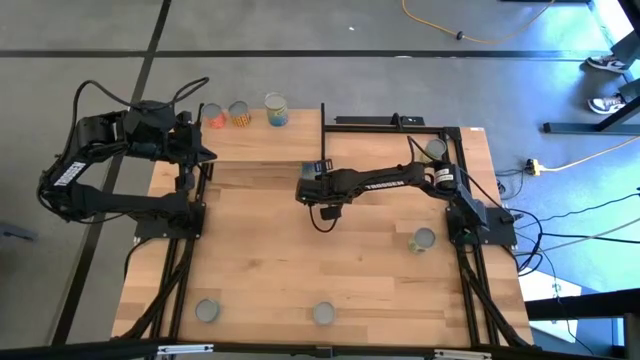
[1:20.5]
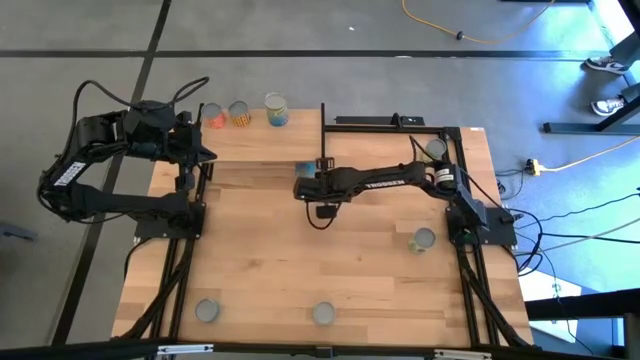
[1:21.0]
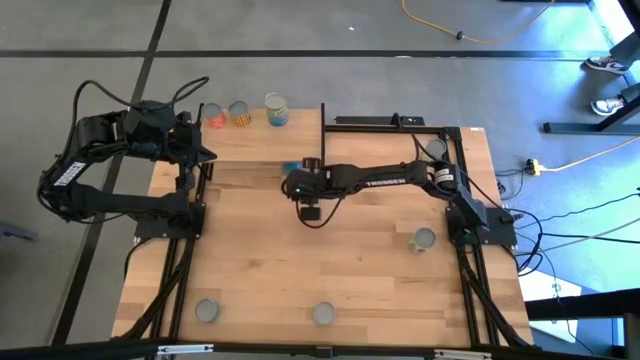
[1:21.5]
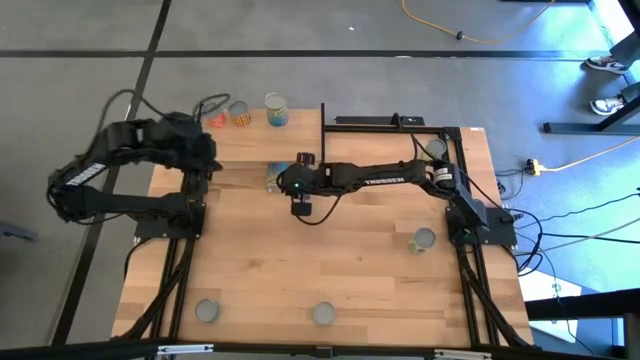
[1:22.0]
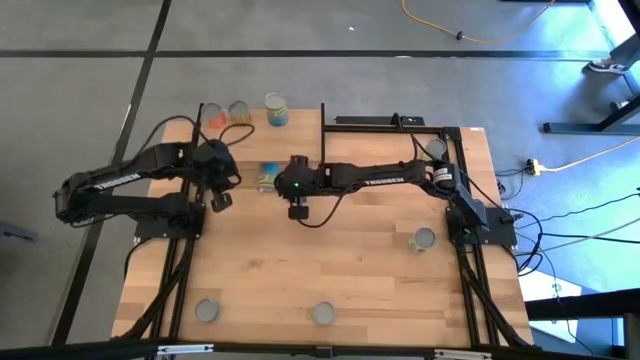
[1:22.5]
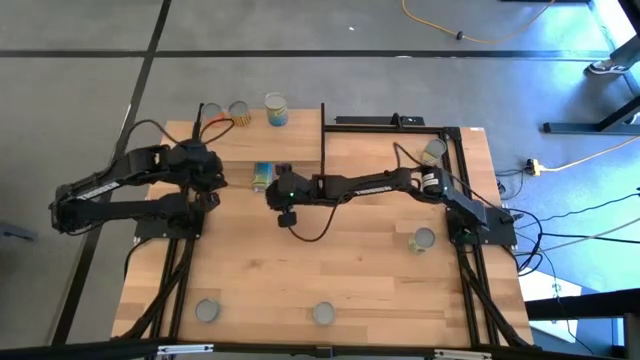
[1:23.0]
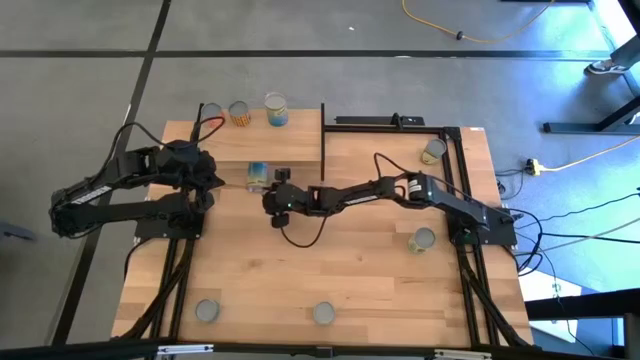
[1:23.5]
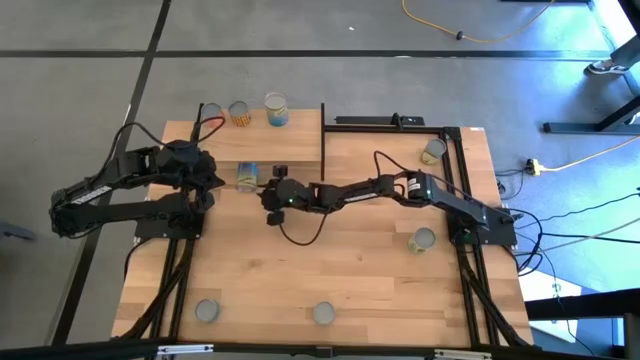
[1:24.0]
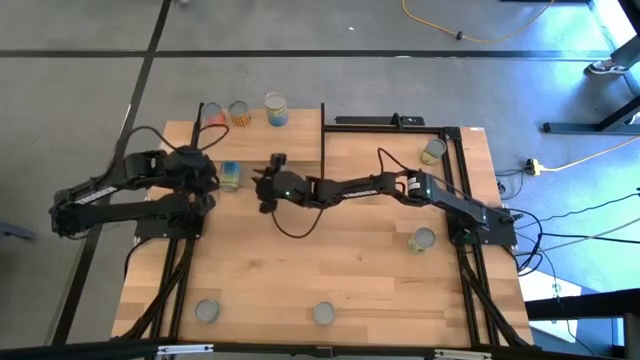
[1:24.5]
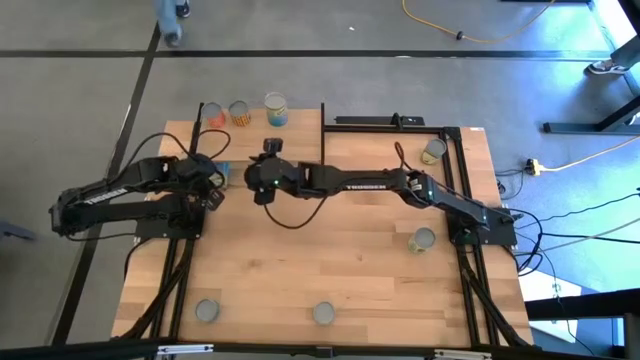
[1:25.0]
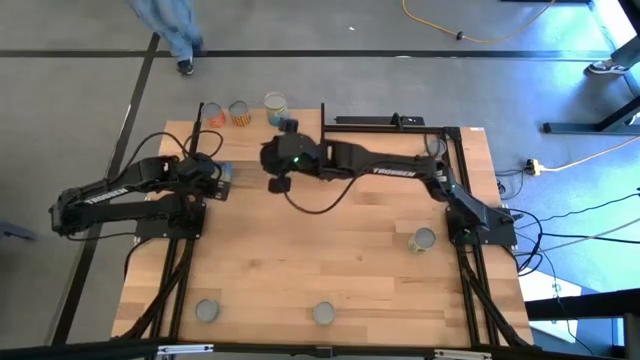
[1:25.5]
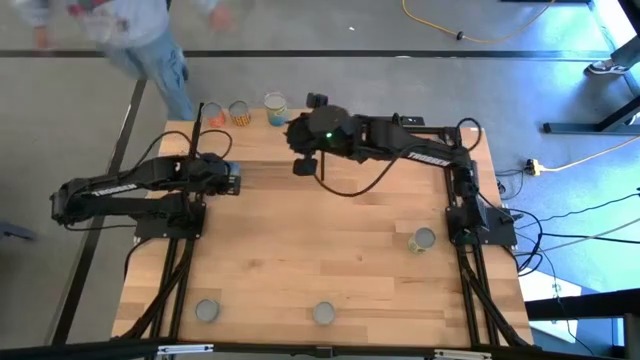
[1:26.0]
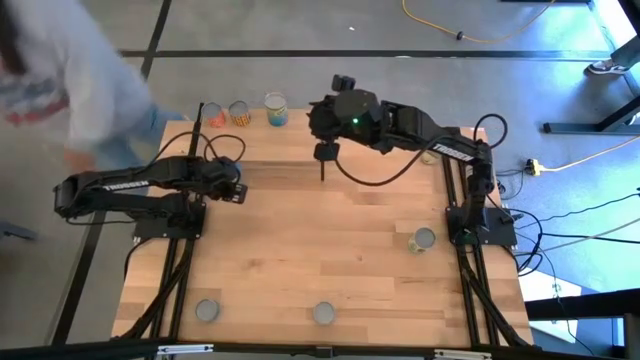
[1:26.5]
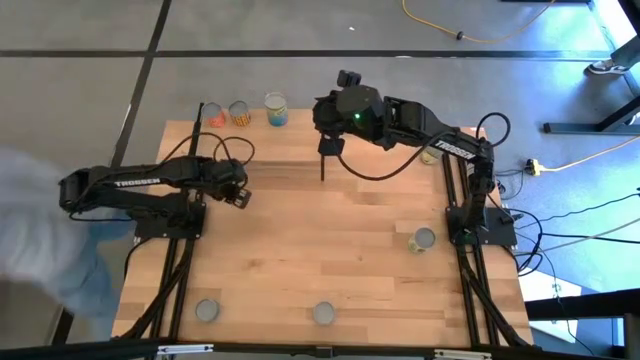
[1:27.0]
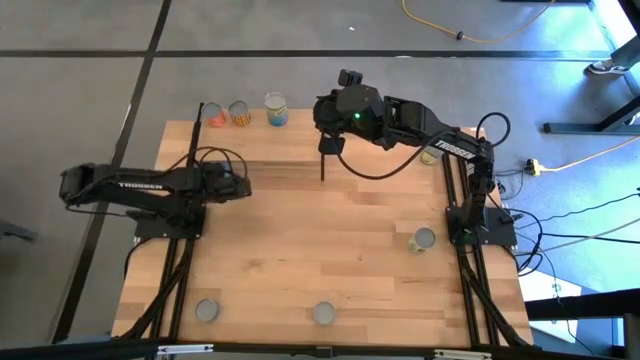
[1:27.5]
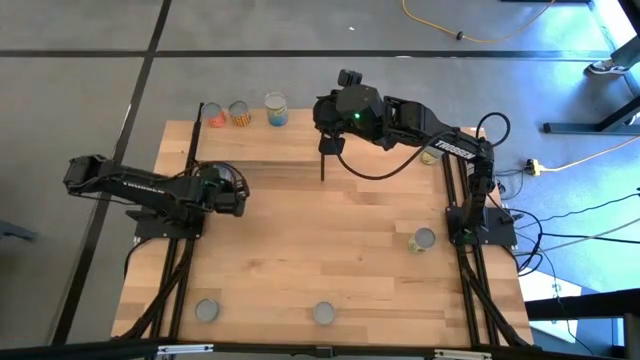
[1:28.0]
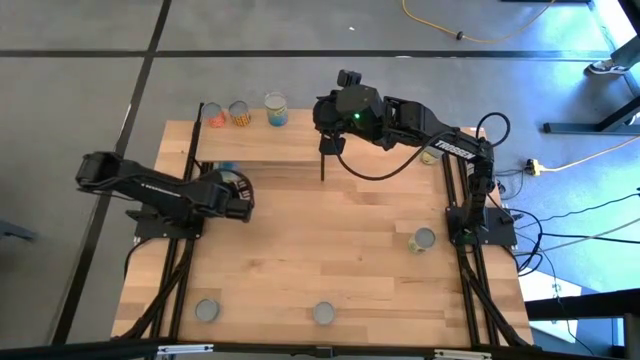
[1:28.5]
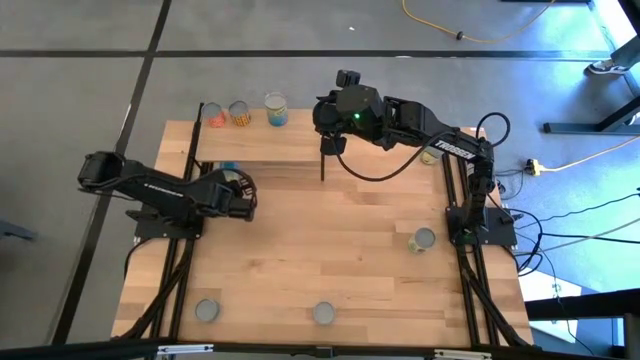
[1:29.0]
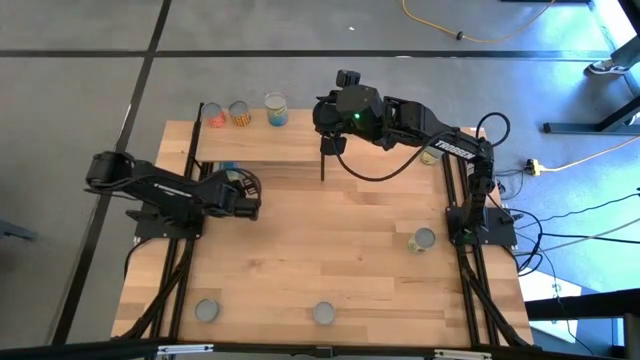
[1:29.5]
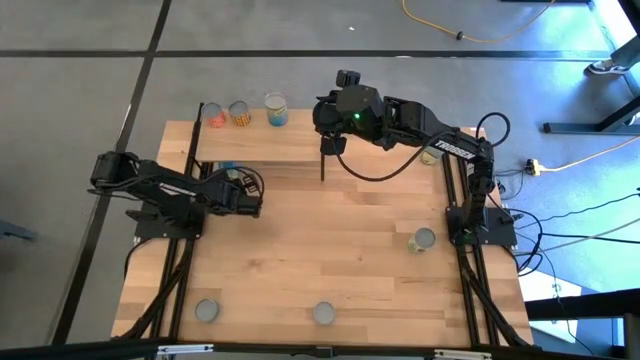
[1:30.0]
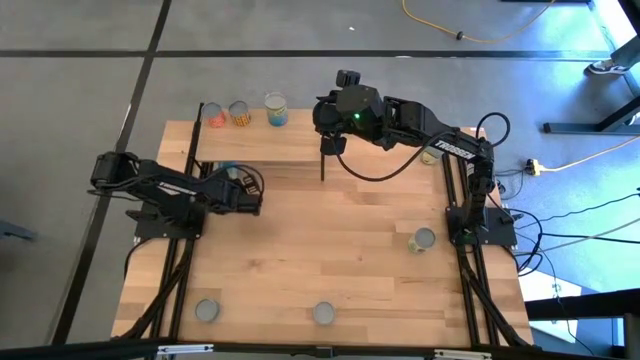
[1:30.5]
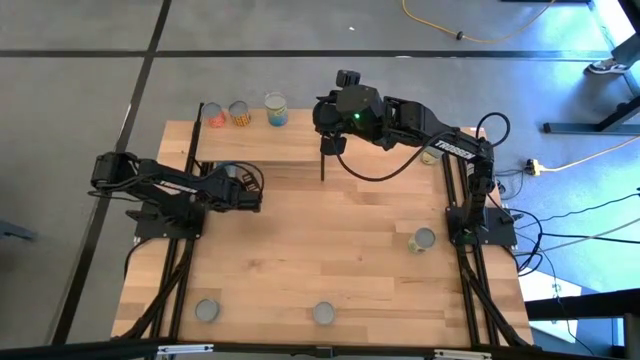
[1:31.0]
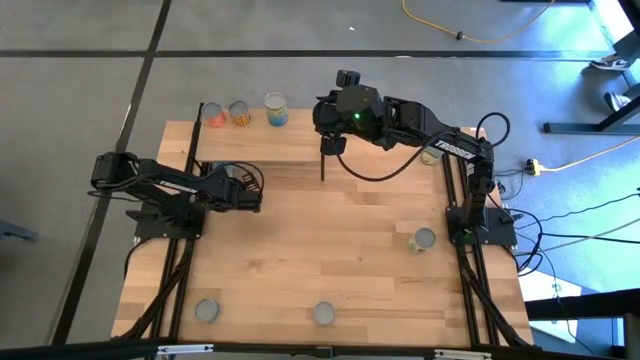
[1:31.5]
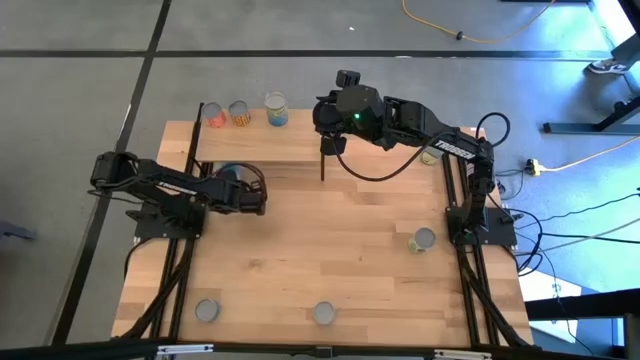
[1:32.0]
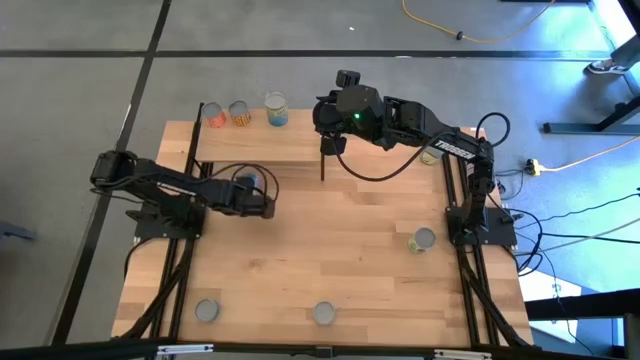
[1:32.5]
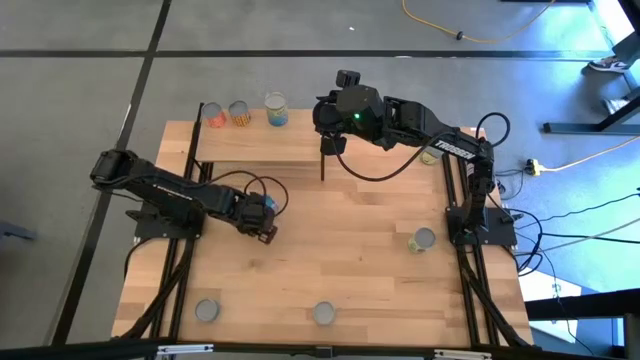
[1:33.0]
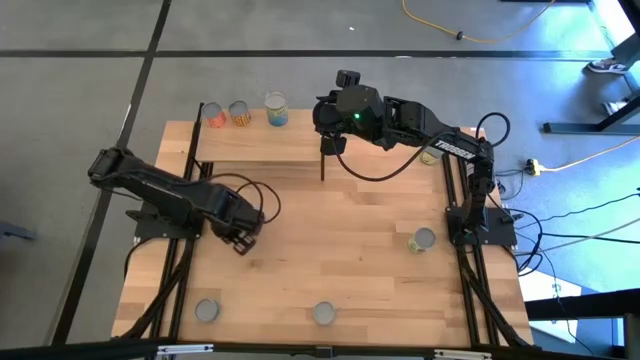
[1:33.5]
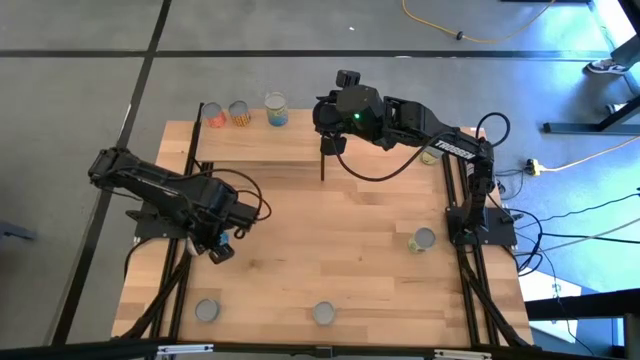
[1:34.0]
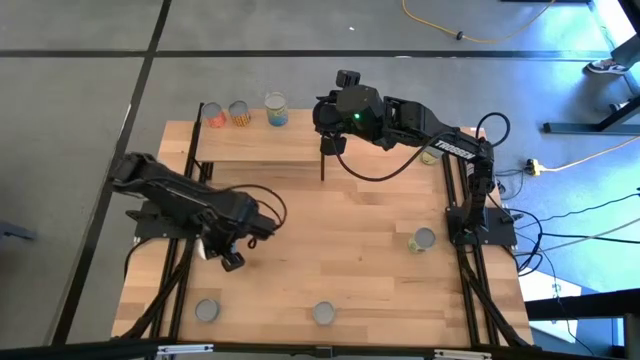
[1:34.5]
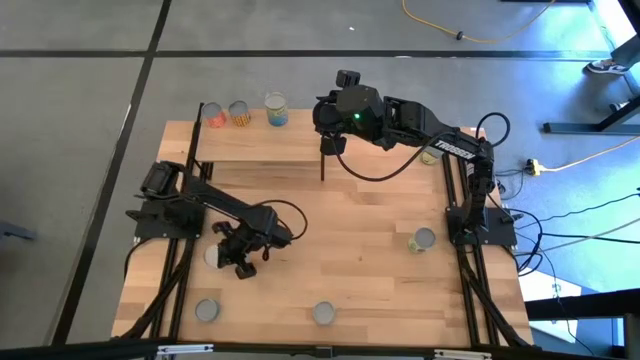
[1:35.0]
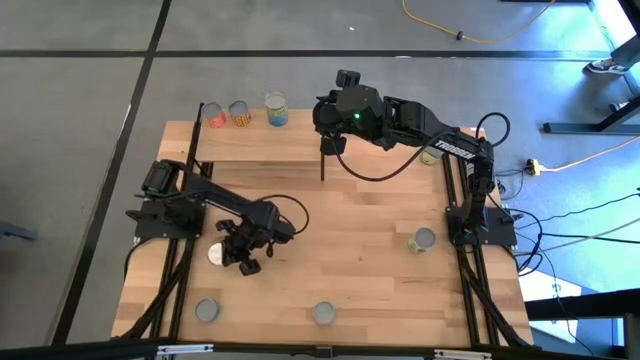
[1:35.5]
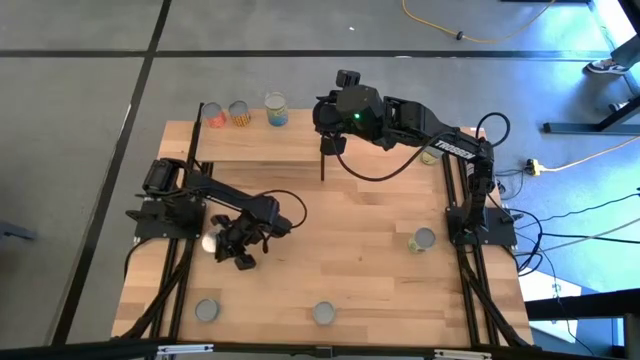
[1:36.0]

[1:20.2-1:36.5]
Task: Pick and place cans onto a shelf
Put the canned cherries on the shelf
